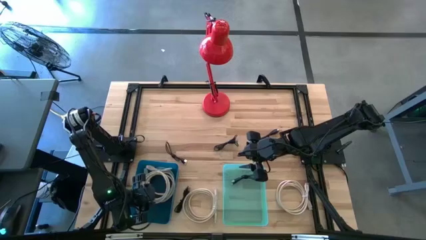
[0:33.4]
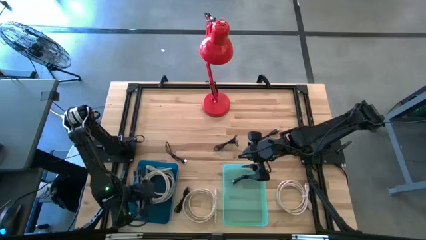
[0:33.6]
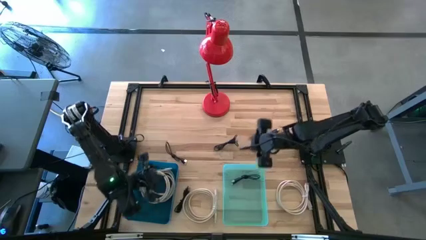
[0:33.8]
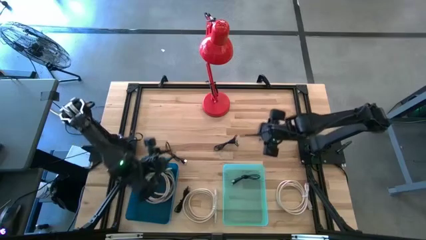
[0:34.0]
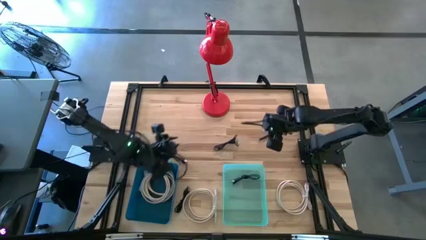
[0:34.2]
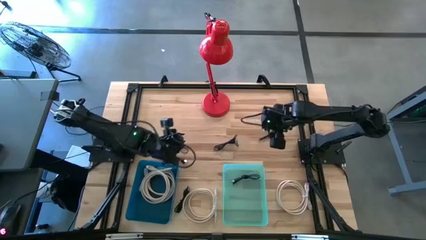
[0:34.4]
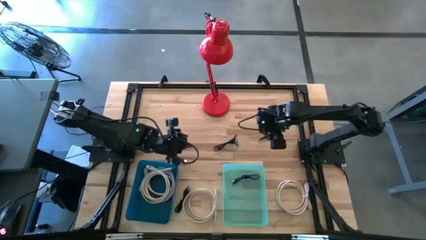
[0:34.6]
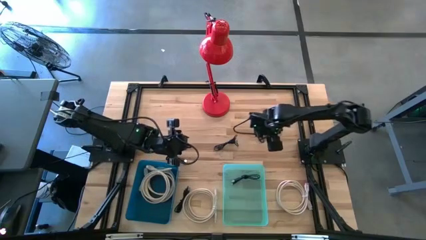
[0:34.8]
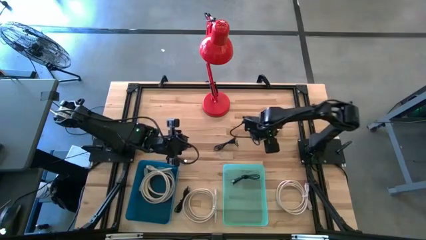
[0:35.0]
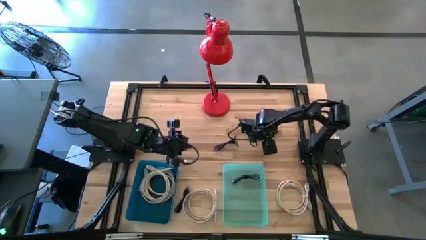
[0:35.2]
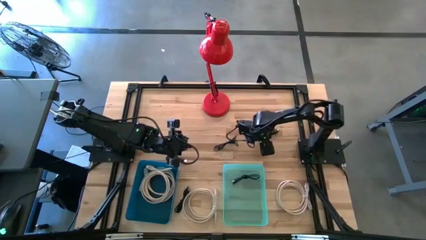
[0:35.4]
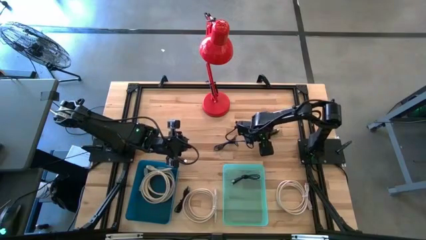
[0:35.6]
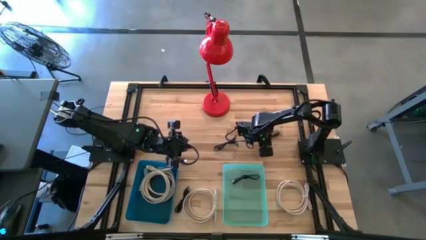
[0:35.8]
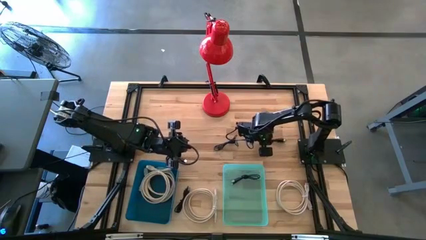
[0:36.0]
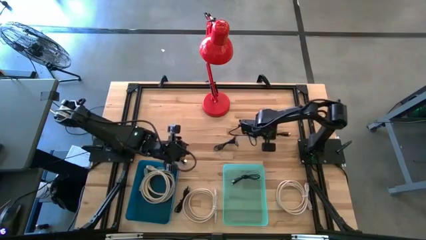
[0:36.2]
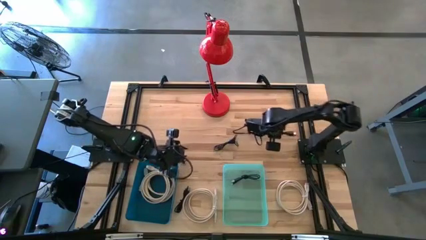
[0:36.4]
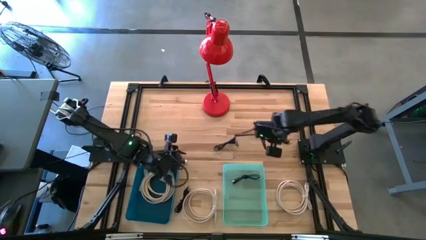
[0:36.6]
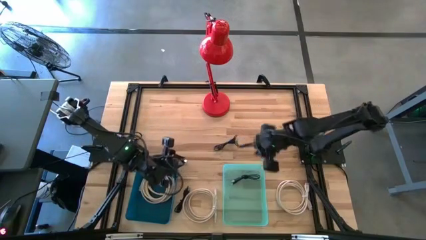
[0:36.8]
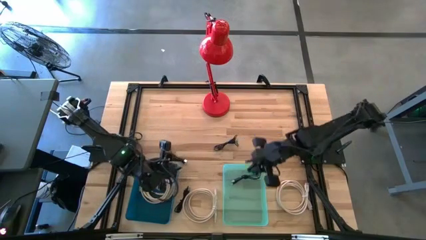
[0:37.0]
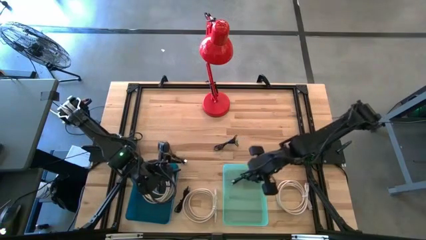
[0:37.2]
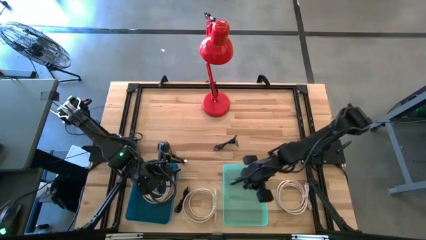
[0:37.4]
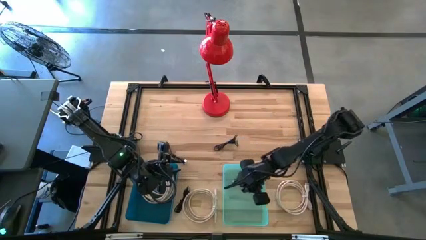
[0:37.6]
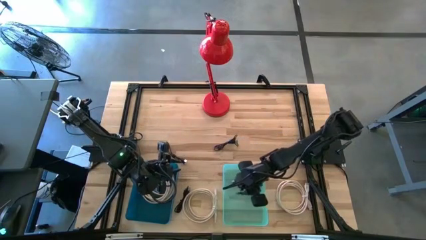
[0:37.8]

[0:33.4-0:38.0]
Task: Pick & Place USB Port
Put the black USB cable into the green bin

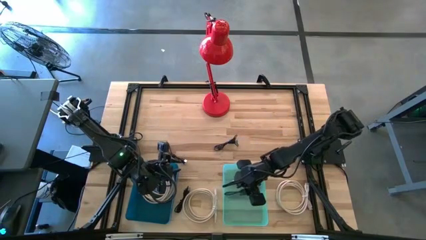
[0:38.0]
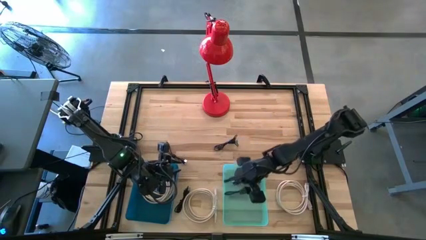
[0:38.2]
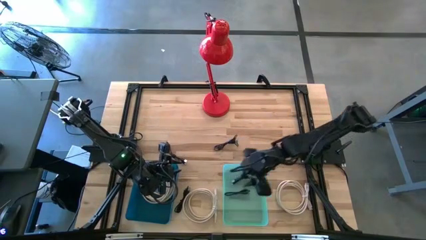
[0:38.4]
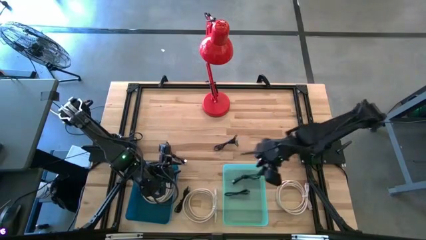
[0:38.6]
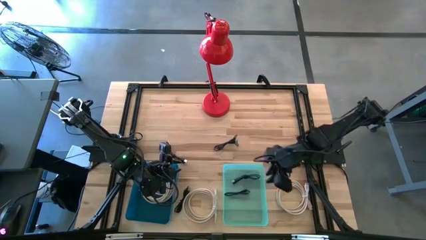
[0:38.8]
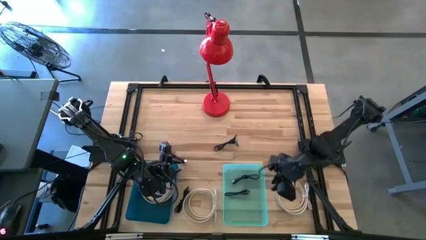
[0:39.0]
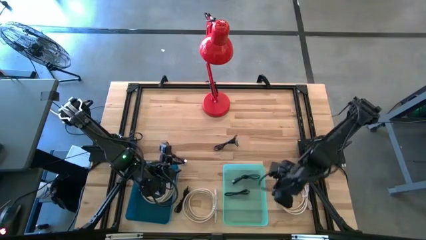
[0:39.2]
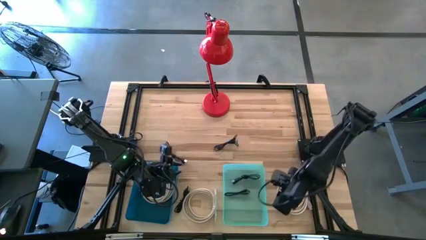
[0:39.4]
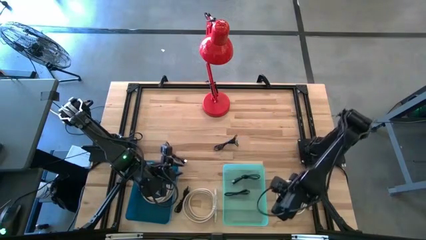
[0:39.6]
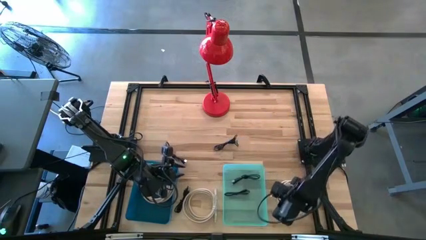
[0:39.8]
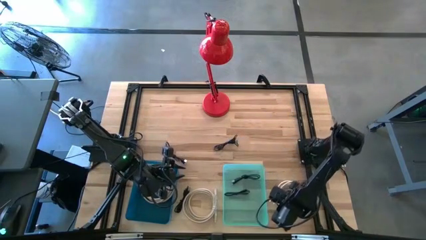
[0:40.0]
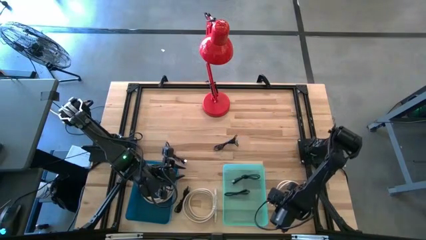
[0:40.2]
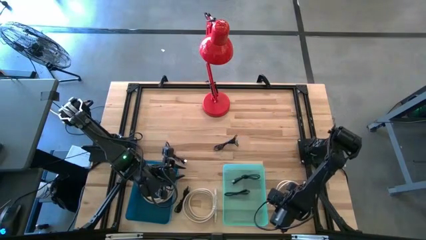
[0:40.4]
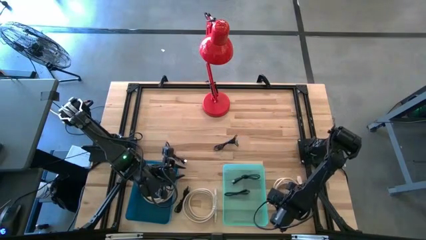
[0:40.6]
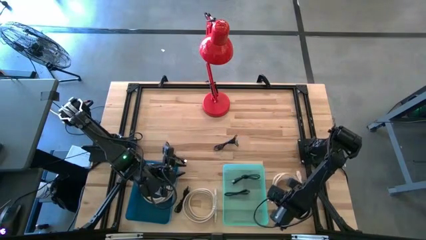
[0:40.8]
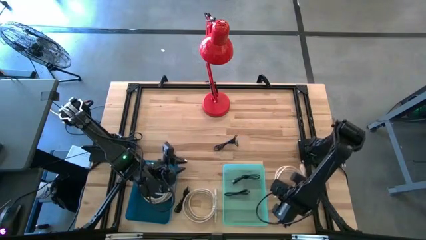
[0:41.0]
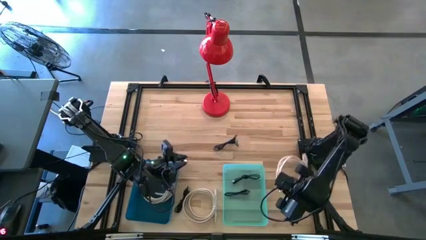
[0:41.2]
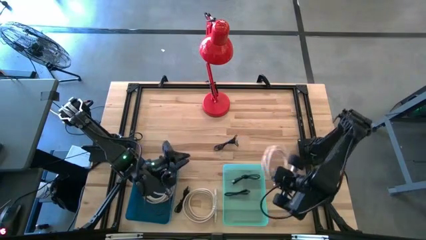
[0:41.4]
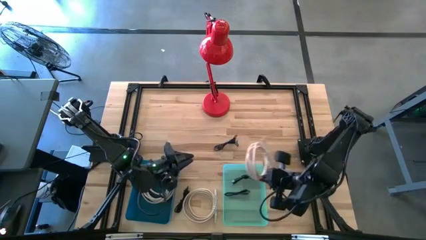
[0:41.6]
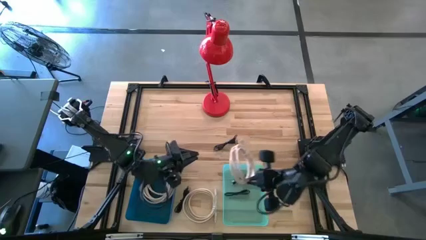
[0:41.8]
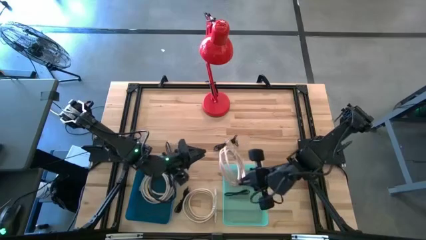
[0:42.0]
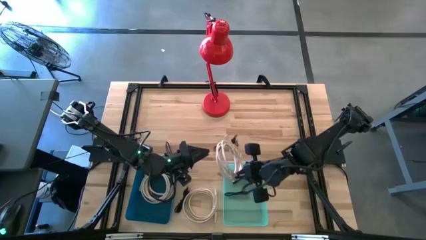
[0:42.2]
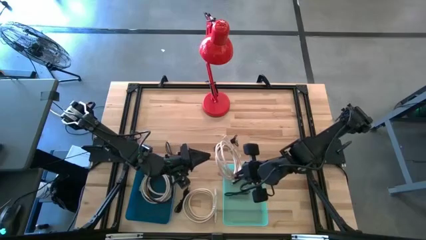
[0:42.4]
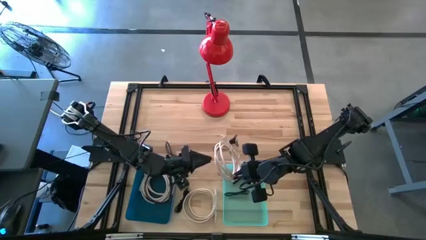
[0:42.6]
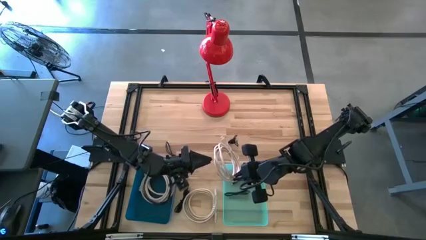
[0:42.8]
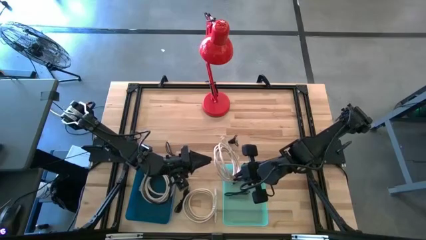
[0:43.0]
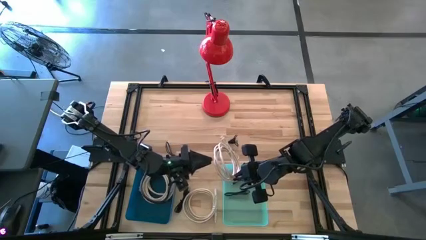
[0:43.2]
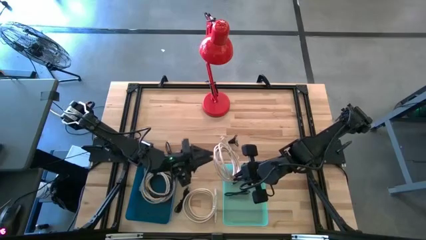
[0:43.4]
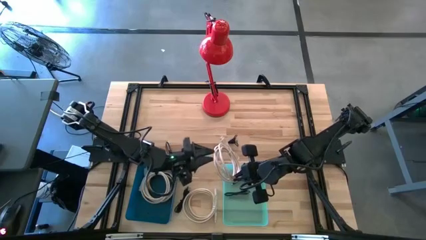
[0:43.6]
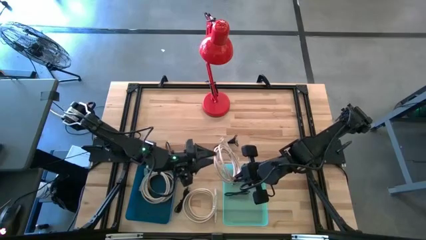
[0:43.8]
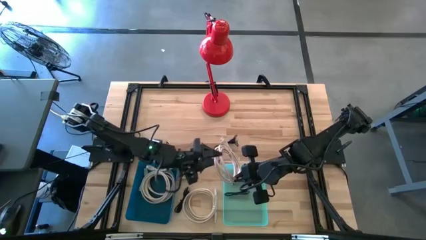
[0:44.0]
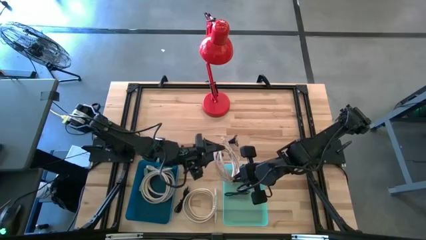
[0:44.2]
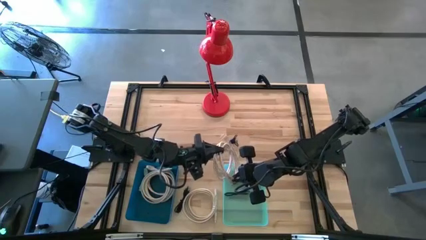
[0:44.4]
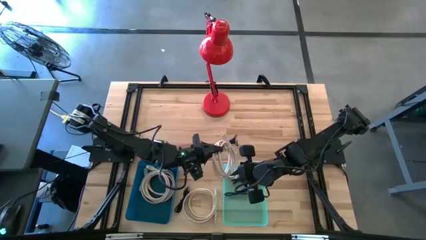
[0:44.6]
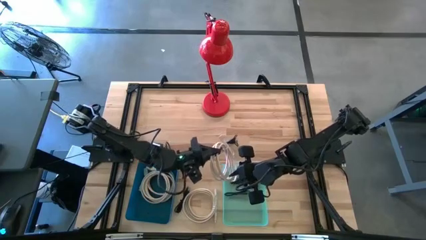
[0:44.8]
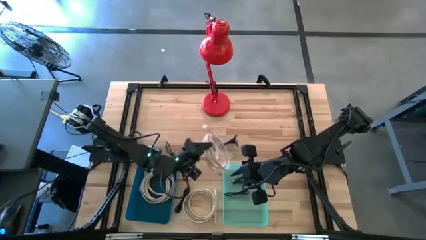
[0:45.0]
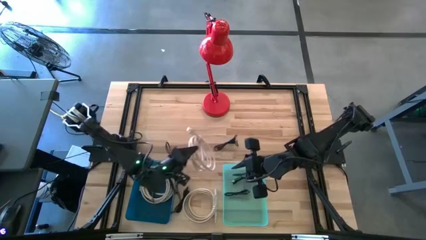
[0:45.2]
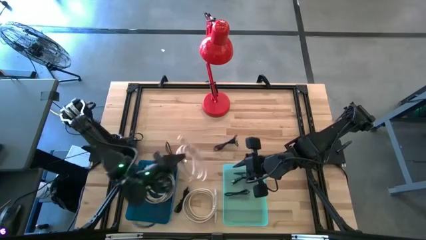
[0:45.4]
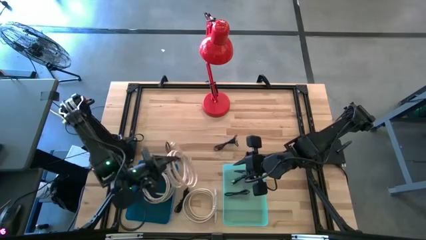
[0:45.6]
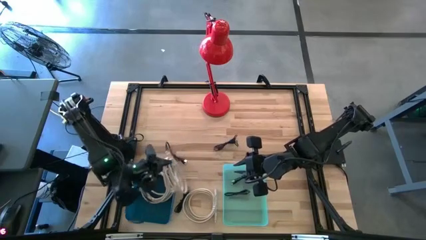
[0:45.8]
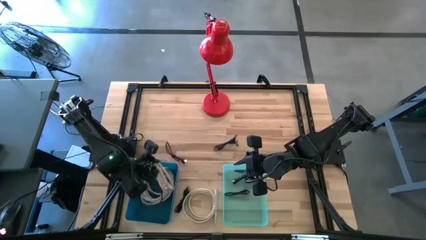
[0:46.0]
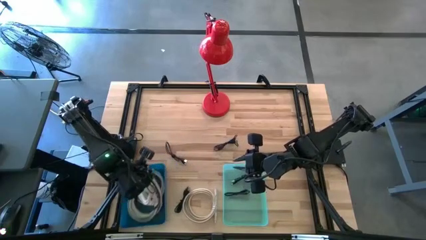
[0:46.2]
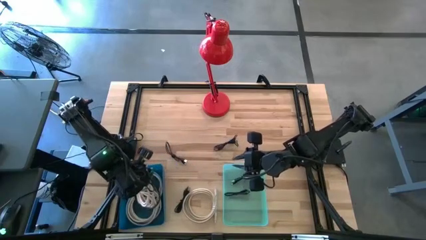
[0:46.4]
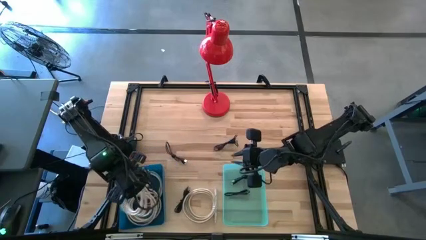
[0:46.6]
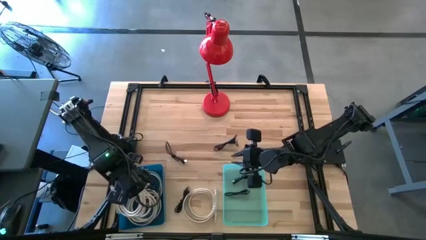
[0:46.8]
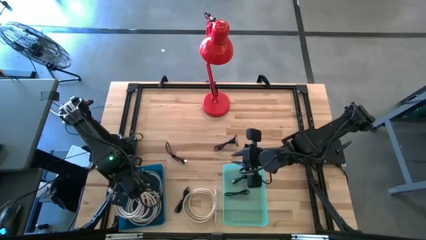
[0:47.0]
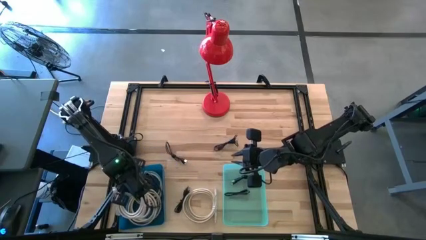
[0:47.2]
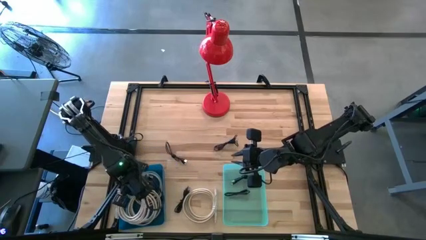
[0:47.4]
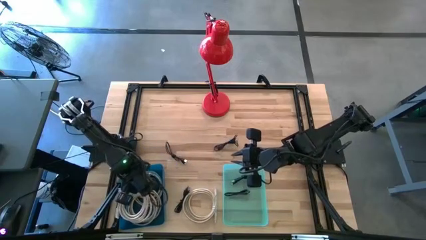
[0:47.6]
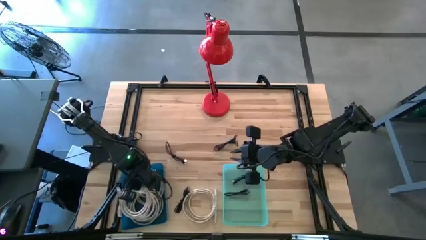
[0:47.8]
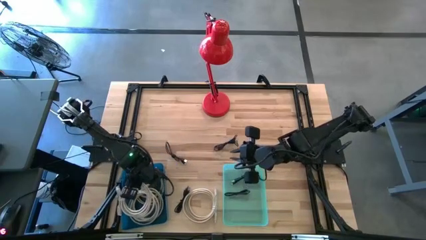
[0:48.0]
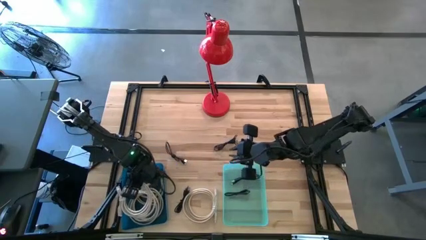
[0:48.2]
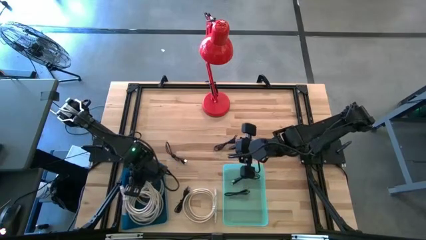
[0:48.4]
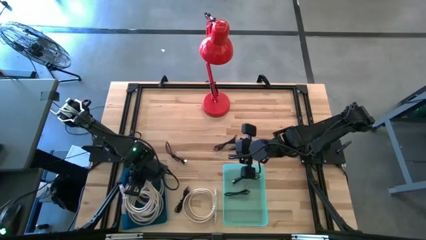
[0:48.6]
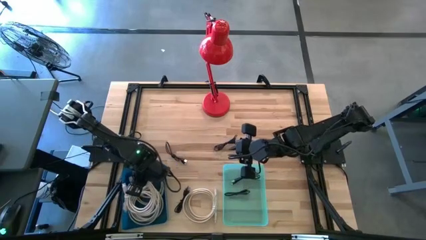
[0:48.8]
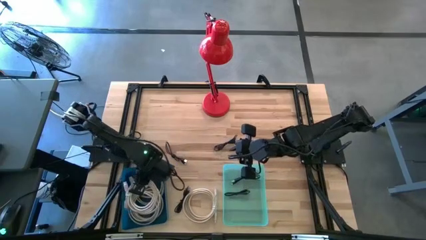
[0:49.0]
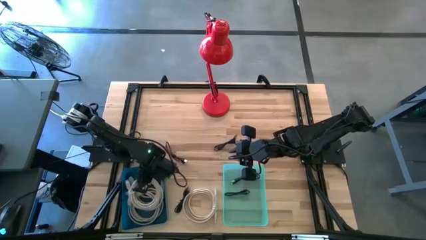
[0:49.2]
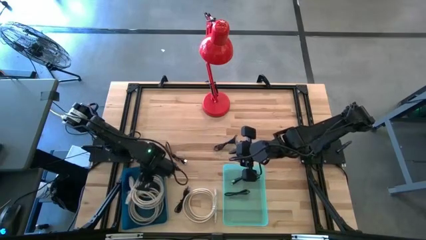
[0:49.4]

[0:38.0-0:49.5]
Put the brown HDMI cable into the blue bin

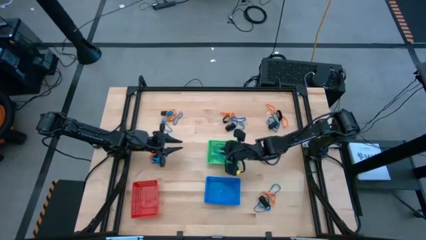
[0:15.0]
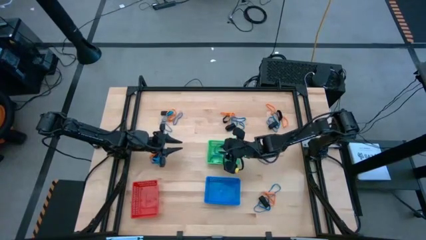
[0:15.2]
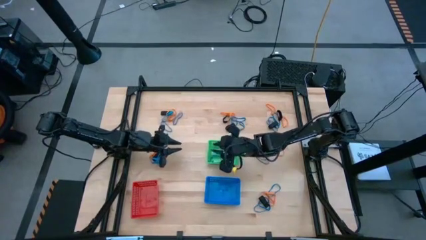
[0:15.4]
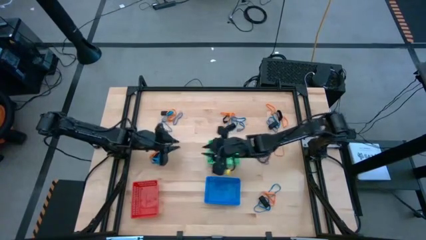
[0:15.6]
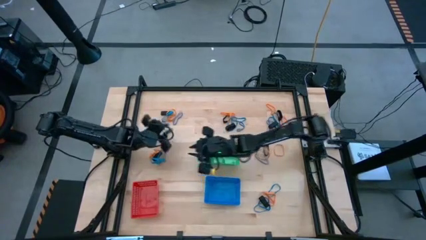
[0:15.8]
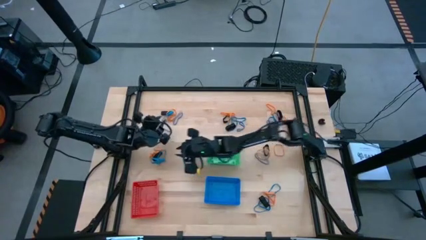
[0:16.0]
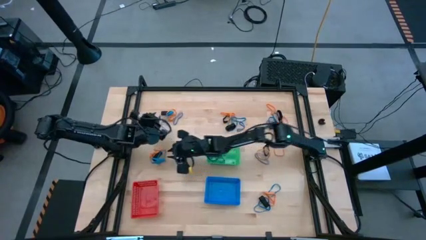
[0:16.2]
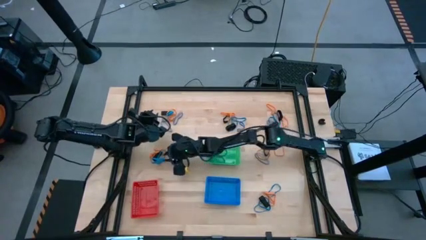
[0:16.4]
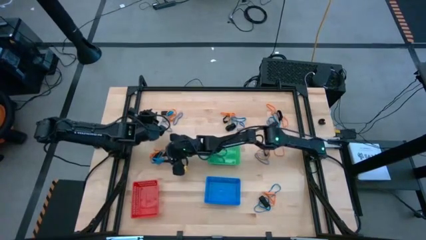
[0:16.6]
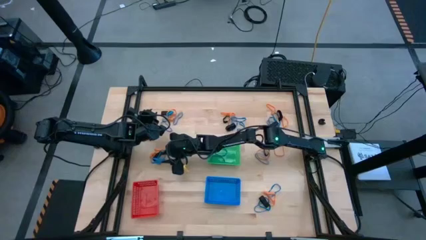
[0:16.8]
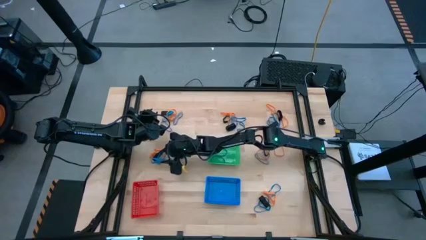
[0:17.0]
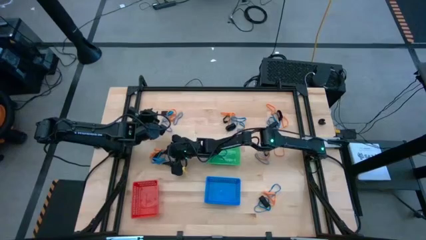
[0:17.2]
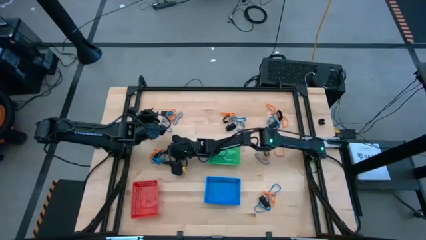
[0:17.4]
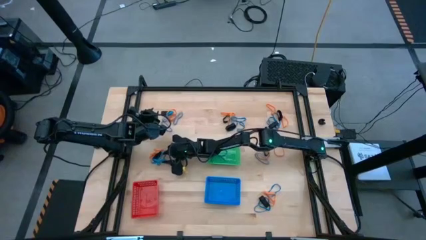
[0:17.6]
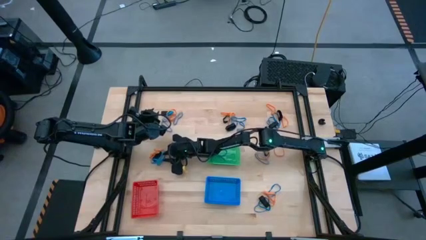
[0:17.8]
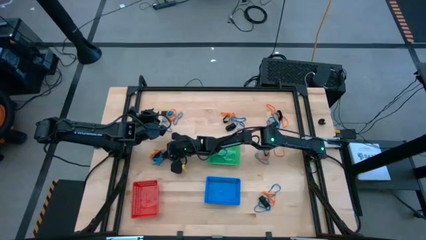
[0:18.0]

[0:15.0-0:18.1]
Task: Sort rubber bands into baskets
Put the blue rubberband into the green bin
